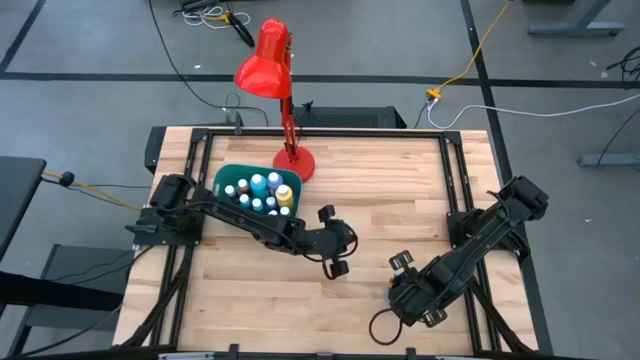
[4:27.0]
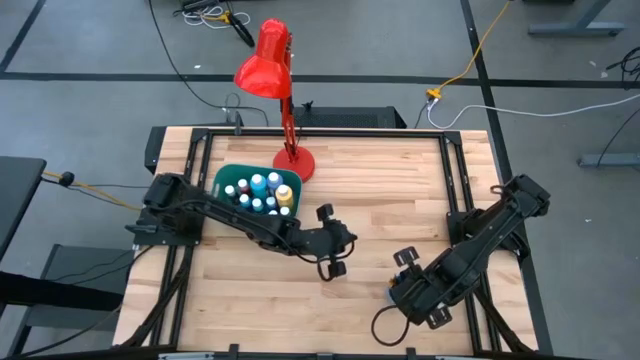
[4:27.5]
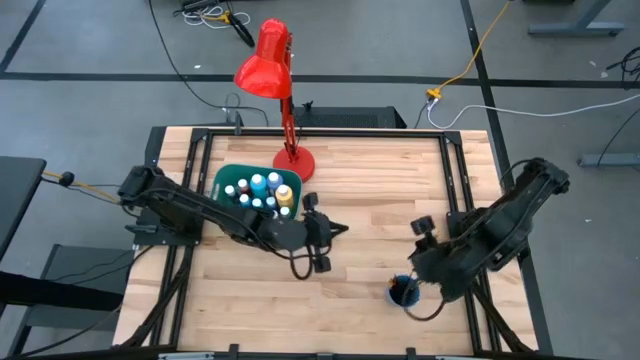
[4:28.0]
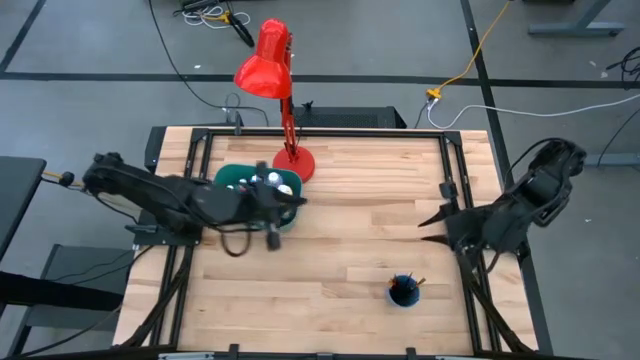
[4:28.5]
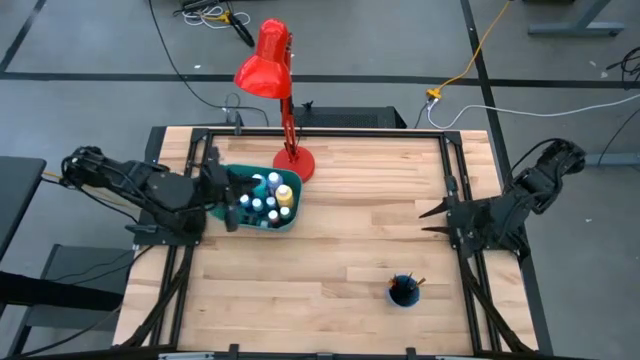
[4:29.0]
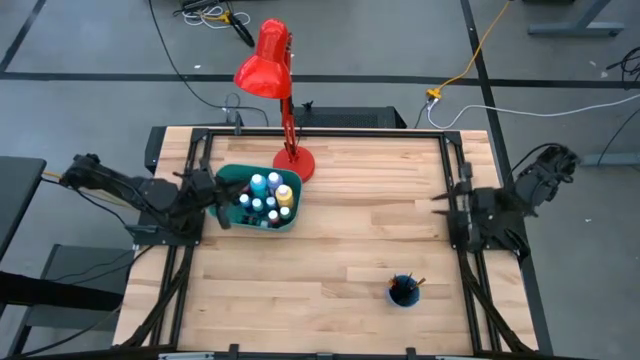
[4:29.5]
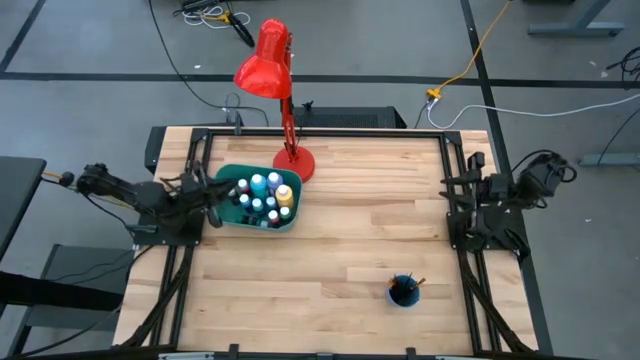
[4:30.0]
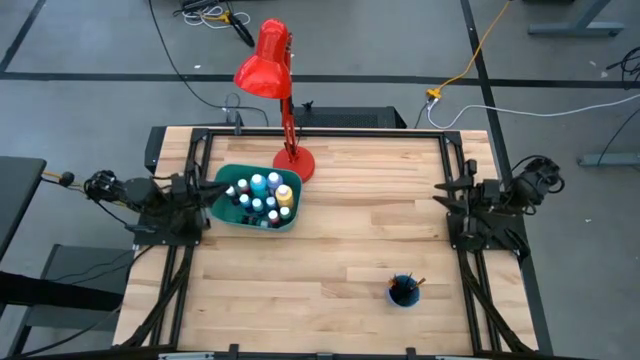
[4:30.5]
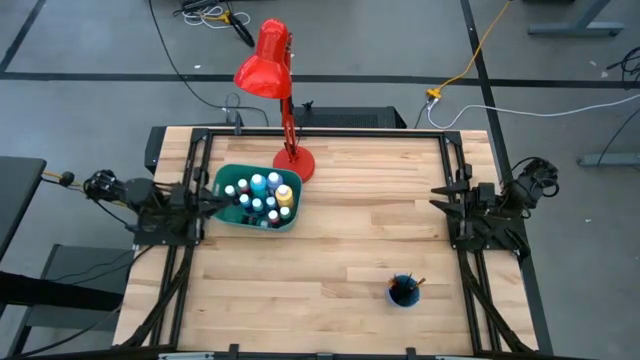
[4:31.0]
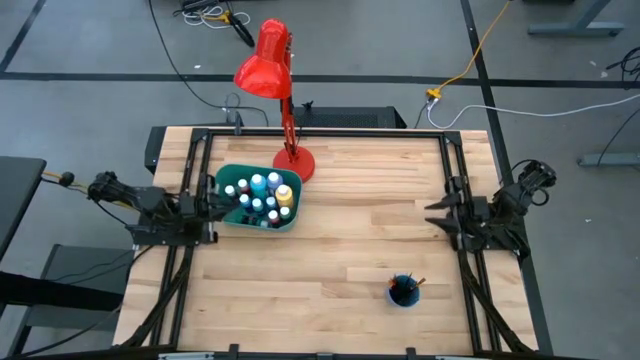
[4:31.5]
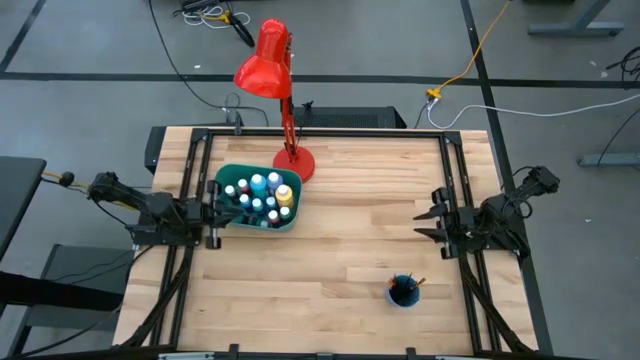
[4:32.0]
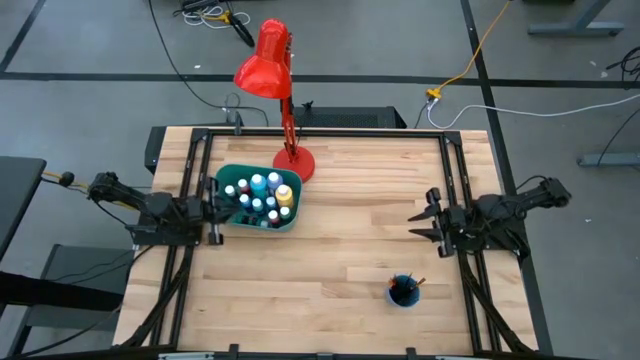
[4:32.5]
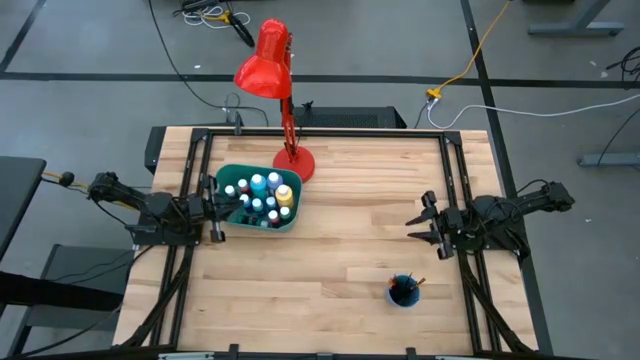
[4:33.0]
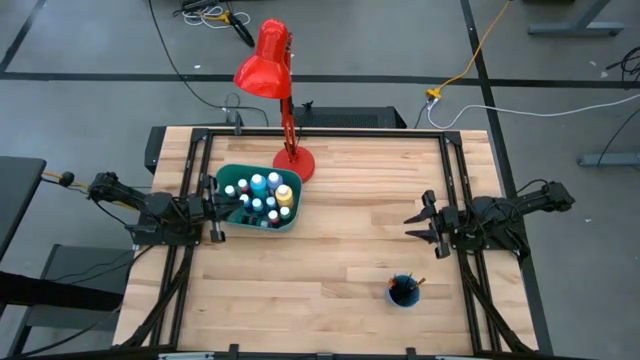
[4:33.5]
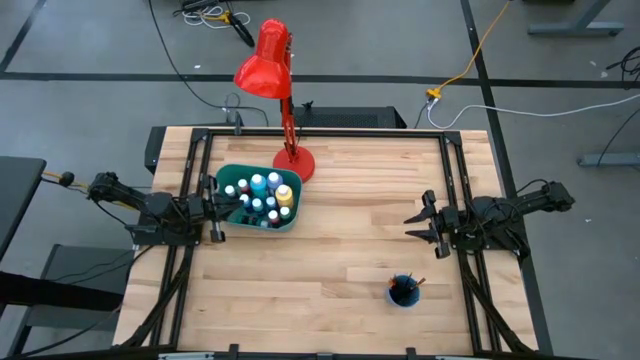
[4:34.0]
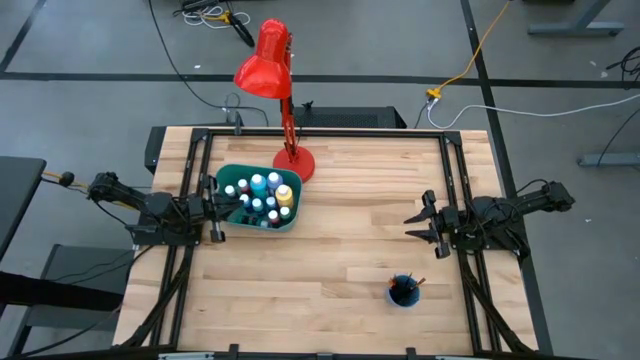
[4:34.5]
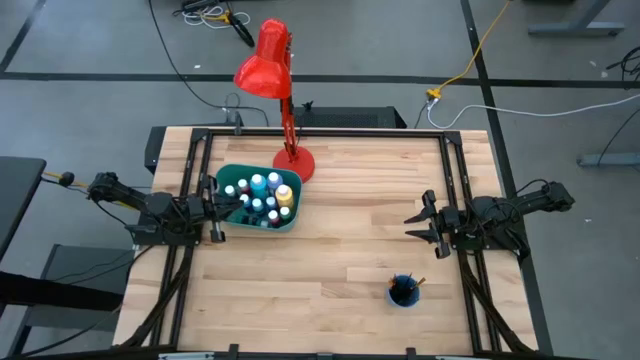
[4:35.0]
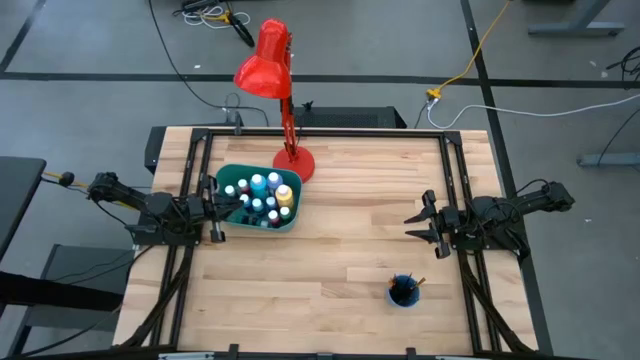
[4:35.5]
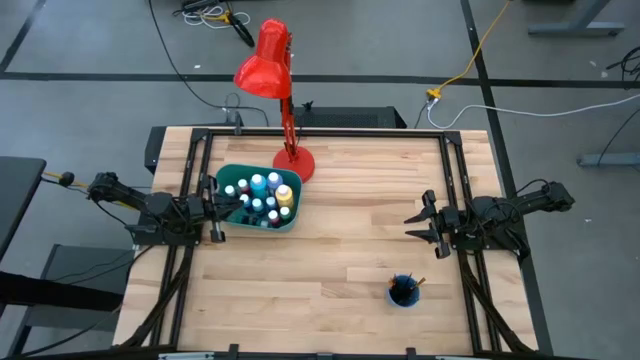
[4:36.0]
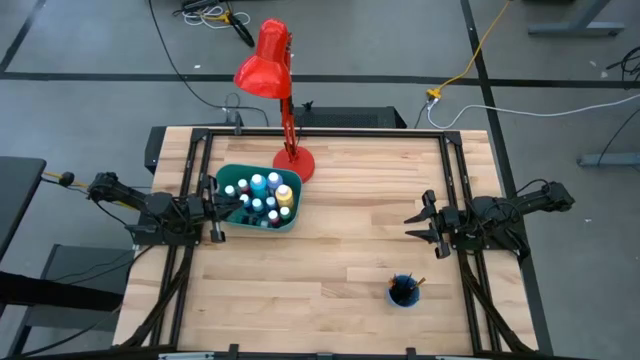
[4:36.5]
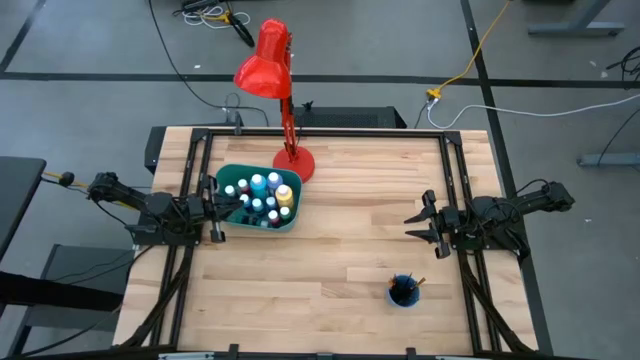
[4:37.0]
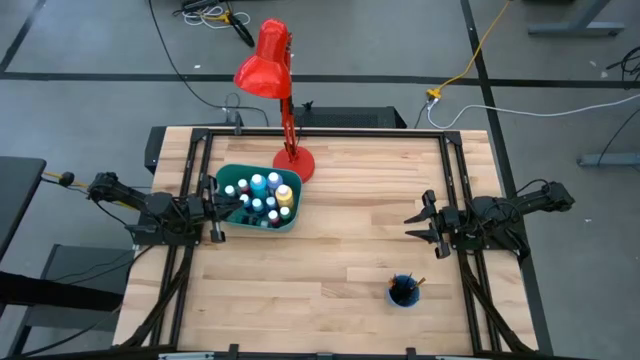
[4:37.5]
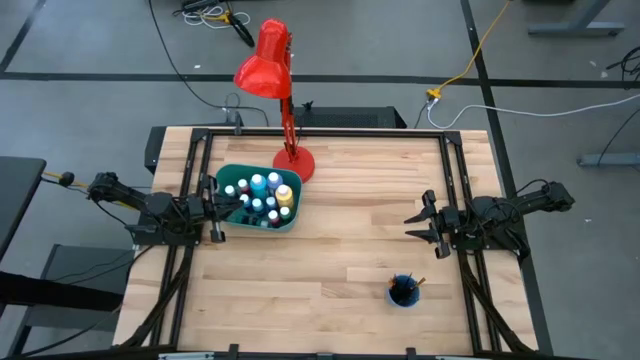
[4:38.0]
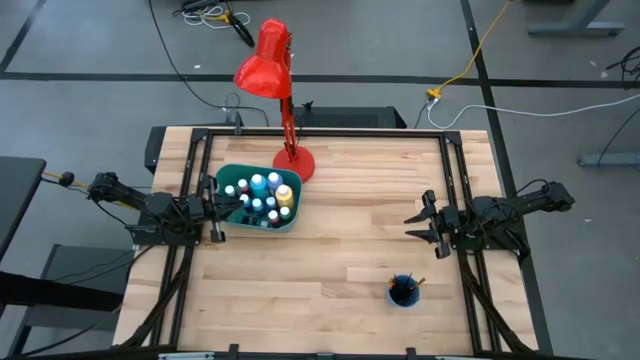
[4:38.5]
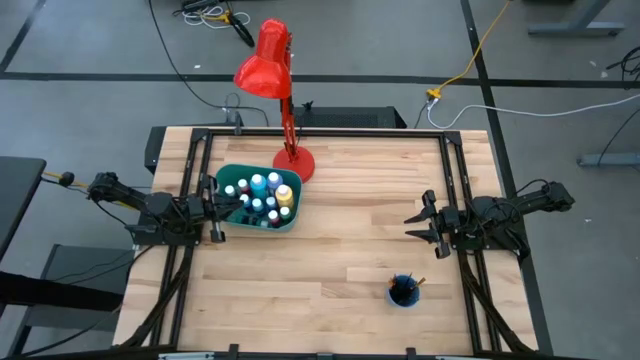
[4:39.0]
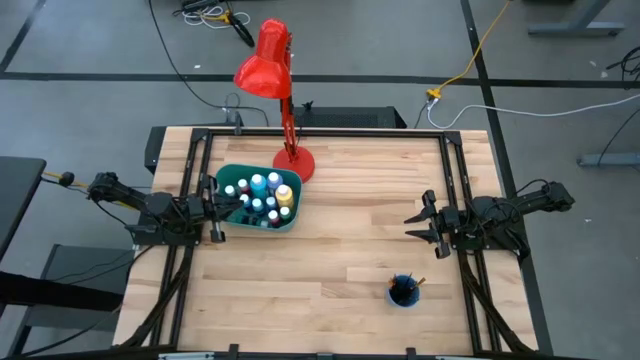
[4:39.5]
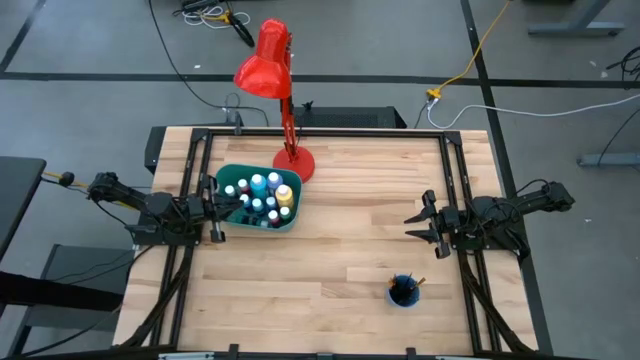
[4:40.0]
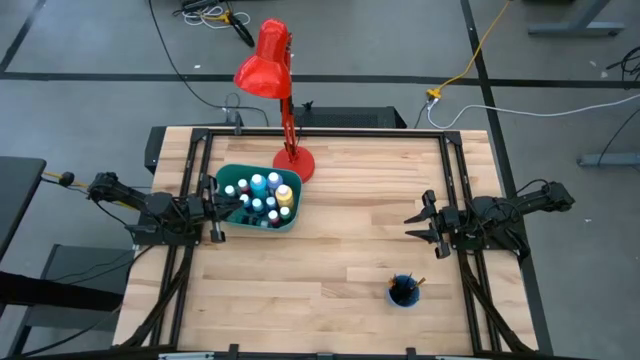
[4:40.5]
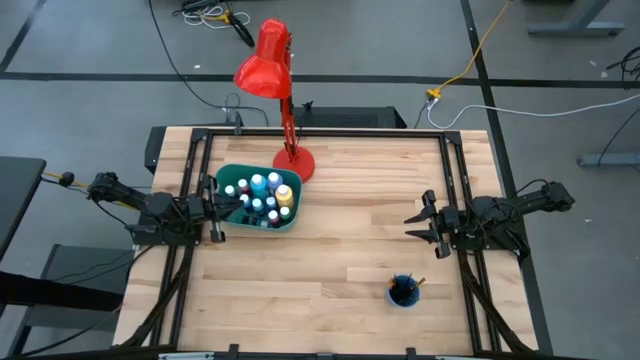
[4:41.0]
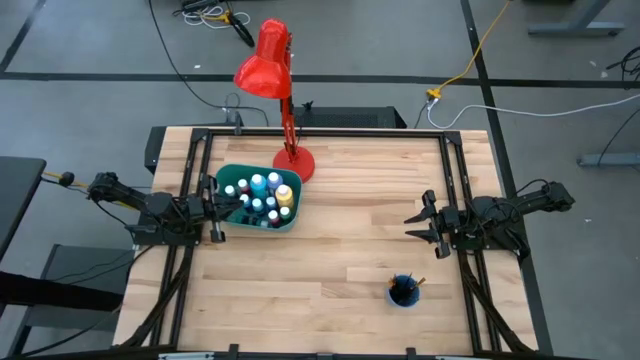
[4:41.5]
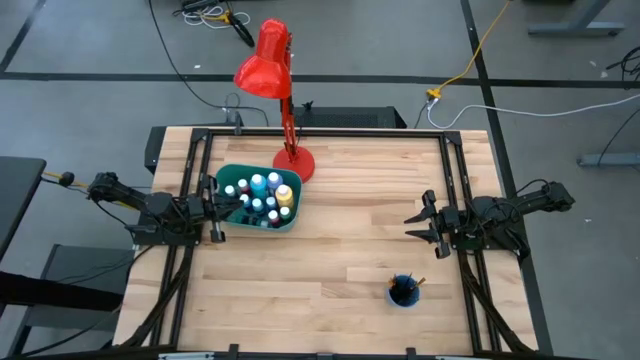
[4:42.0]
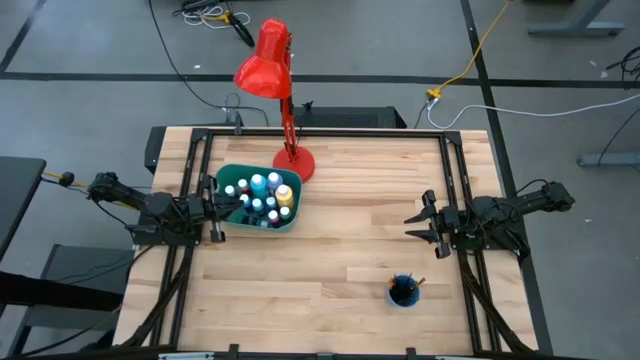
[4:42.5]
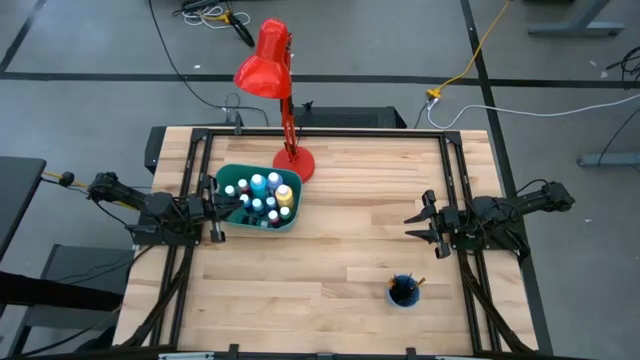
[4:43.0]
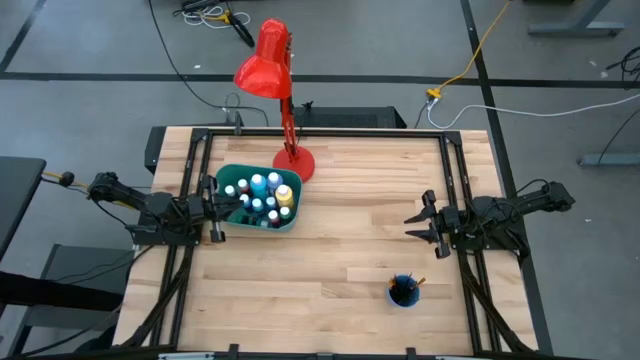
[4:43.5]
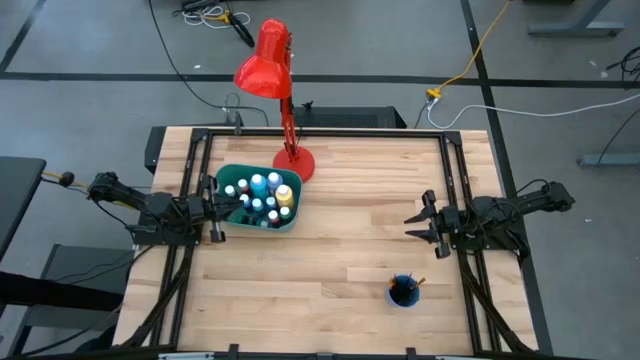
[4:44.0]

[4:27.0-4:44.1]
Task: Pick & Place Paint Supplies
Return to Home Position

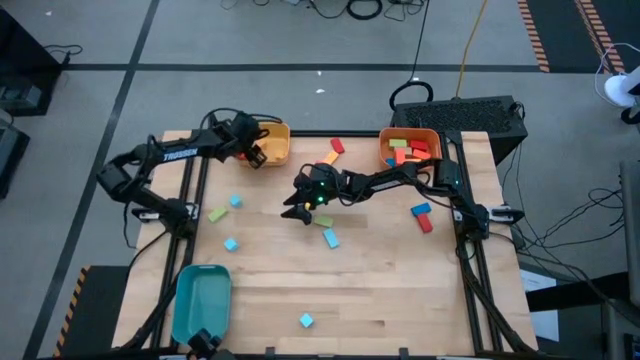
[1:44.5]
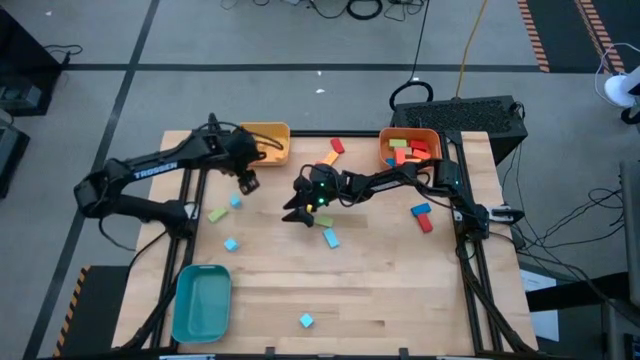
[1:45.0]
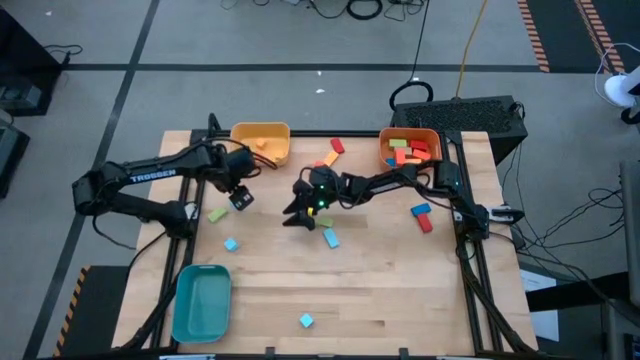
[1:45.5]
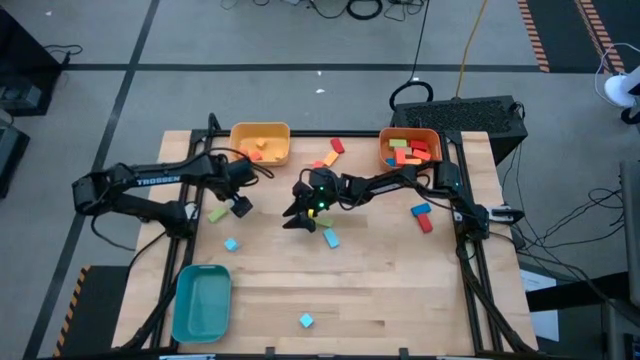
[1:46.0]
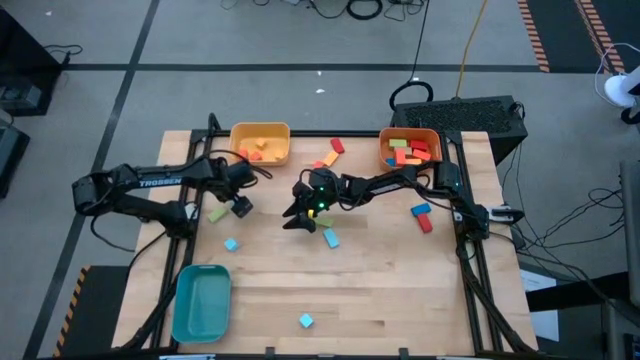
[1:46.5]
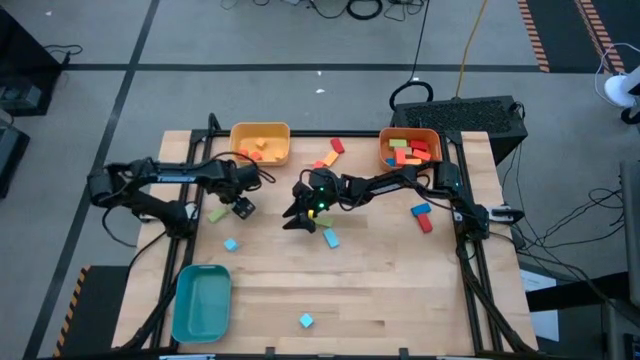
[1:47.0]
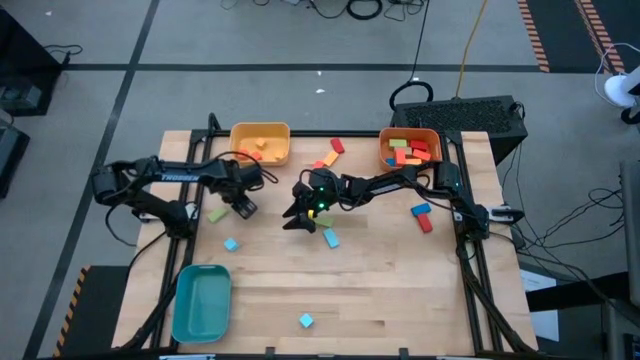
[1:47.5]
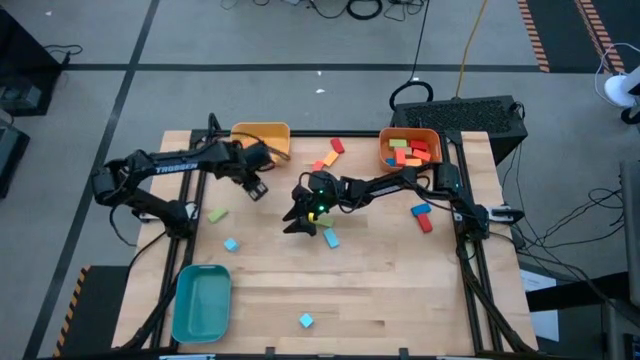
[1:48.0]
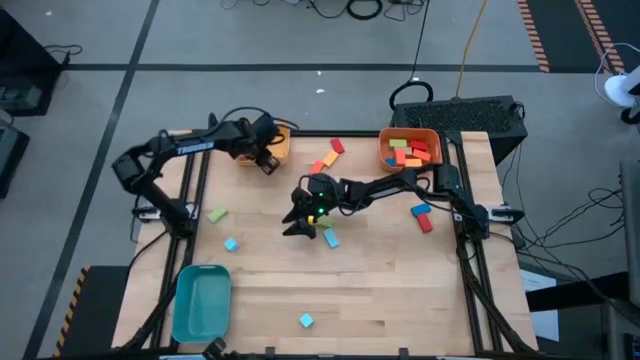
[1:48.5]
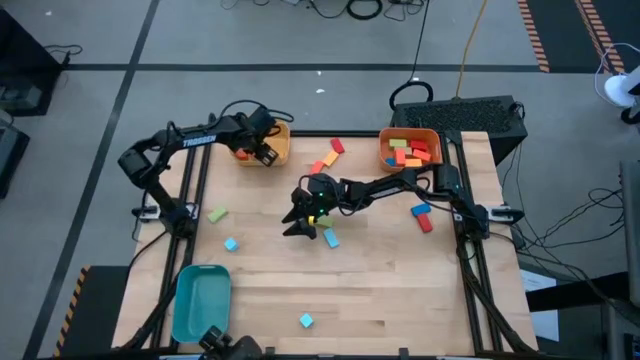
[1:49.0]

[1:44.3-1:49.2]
Task: Sort blocks by size
Put the small light blue block into the yellow bin
